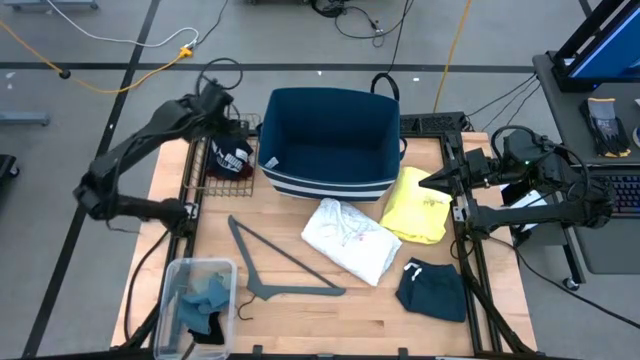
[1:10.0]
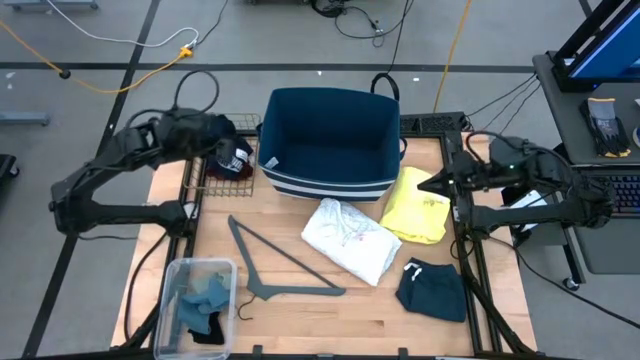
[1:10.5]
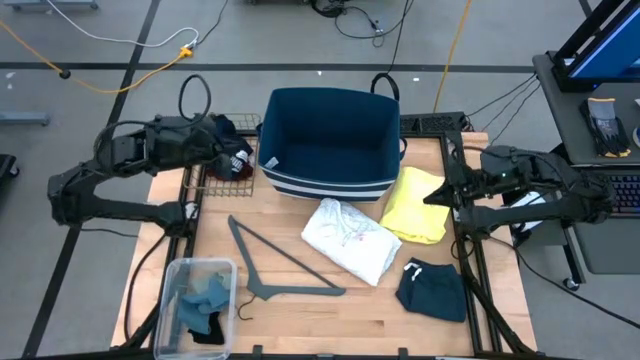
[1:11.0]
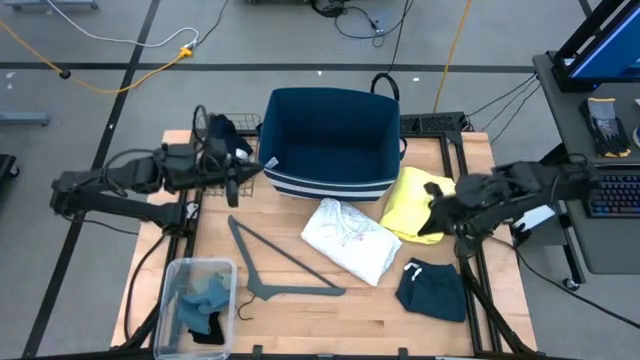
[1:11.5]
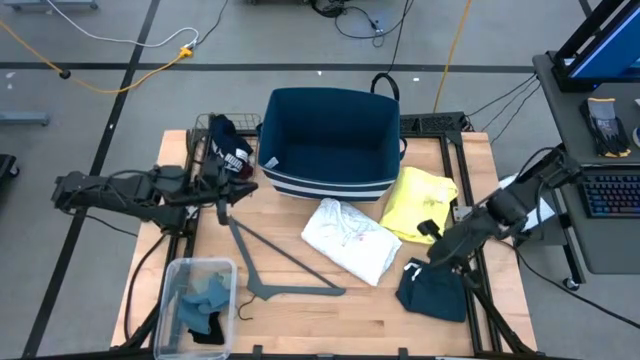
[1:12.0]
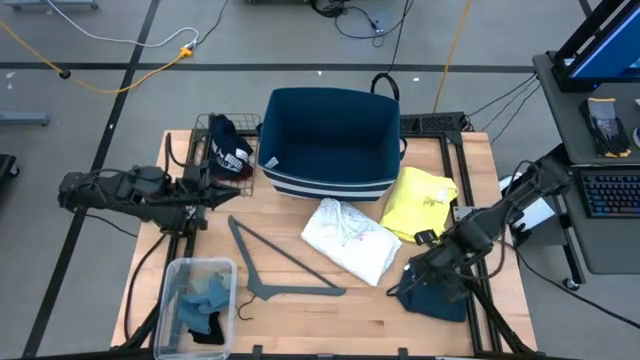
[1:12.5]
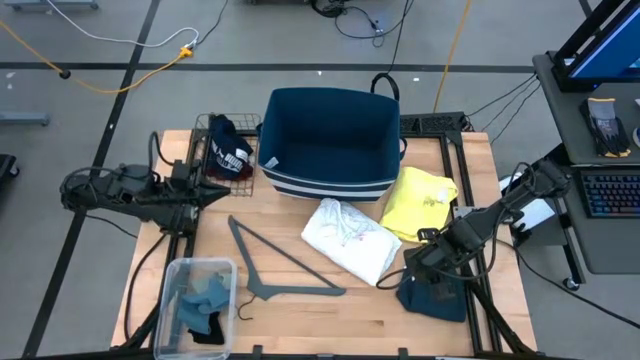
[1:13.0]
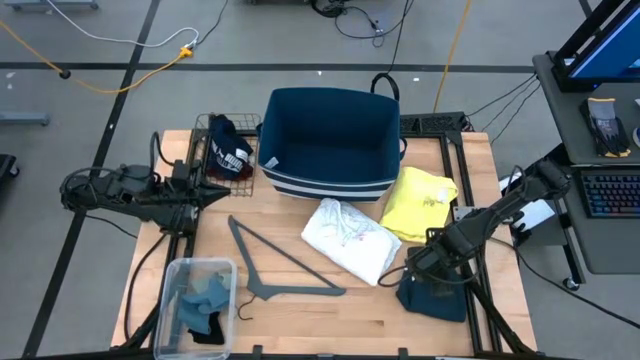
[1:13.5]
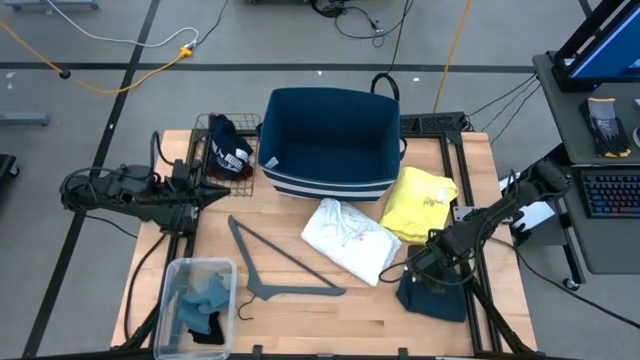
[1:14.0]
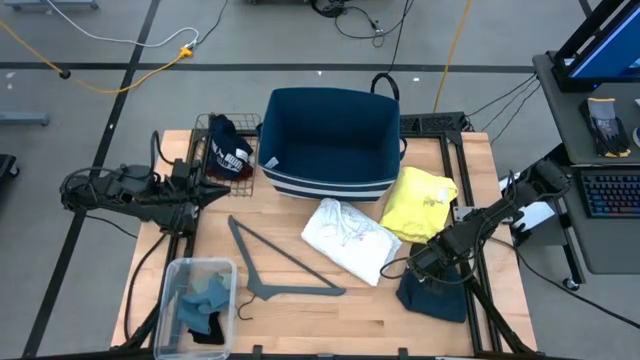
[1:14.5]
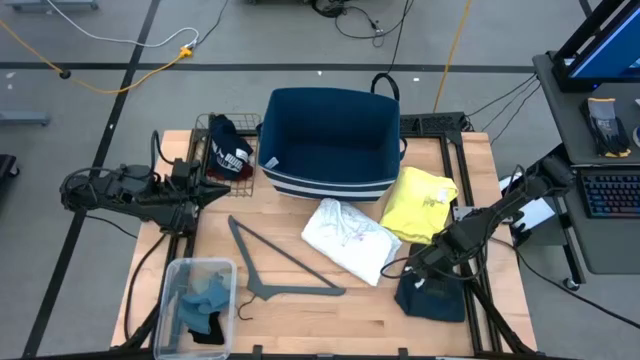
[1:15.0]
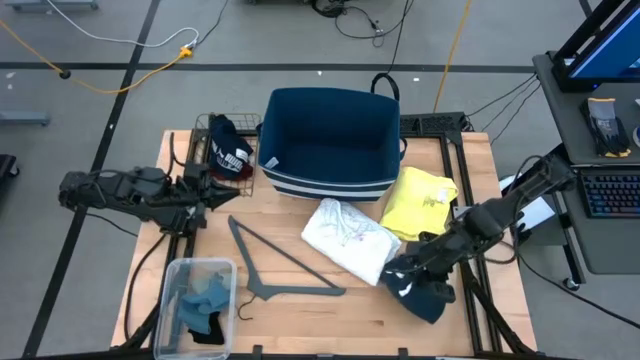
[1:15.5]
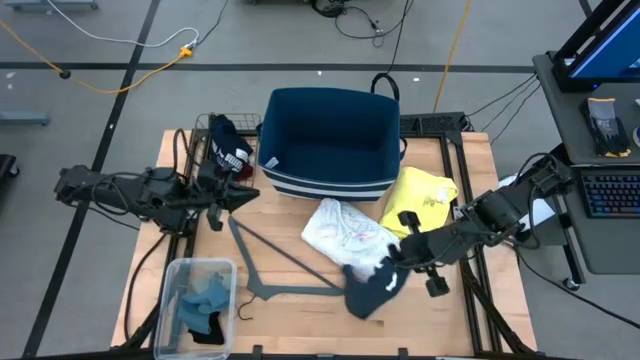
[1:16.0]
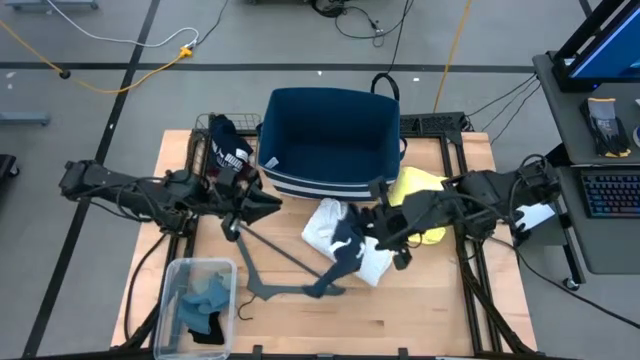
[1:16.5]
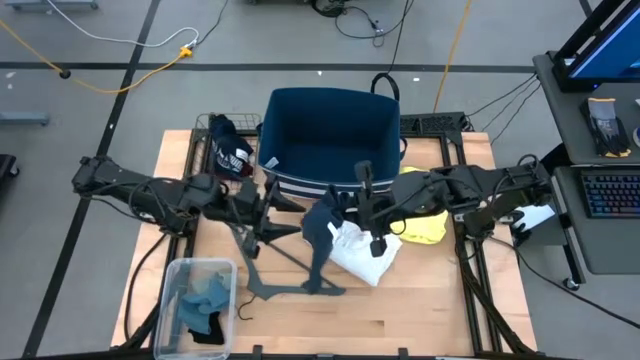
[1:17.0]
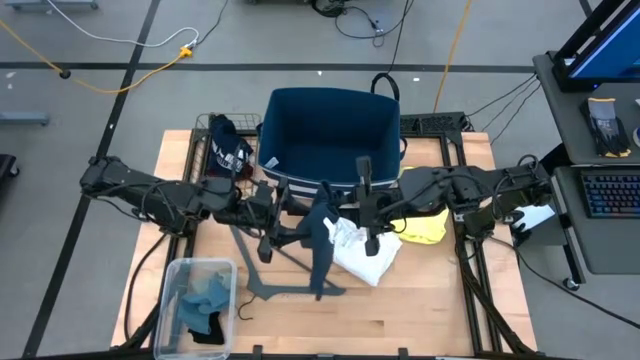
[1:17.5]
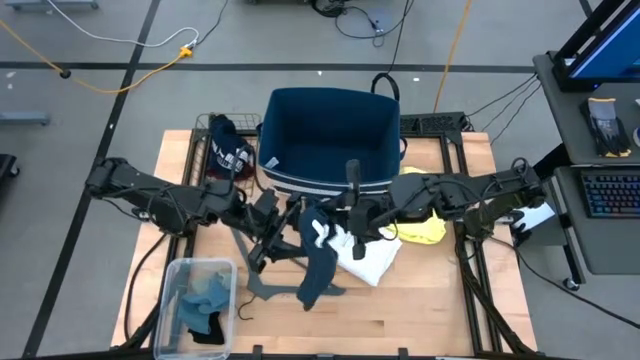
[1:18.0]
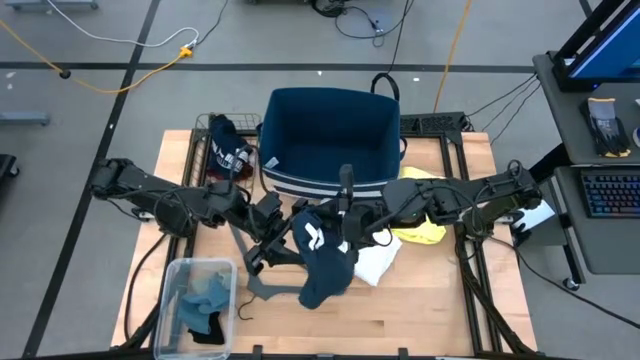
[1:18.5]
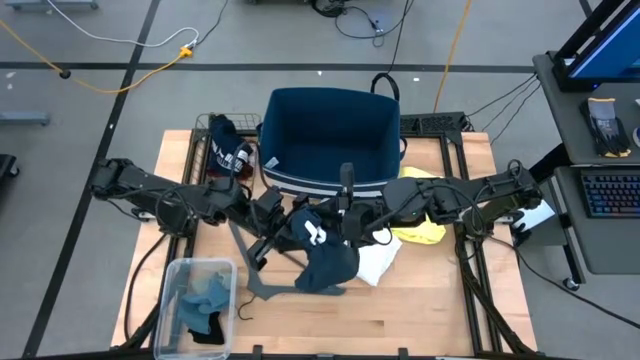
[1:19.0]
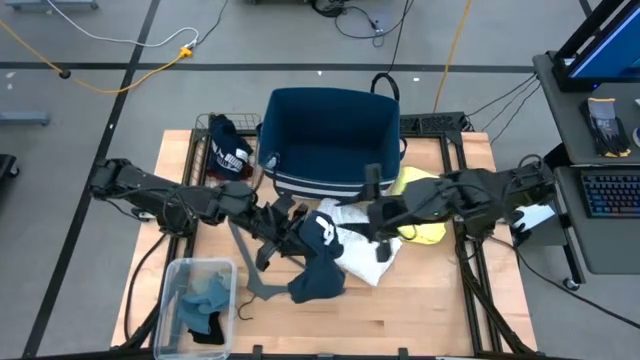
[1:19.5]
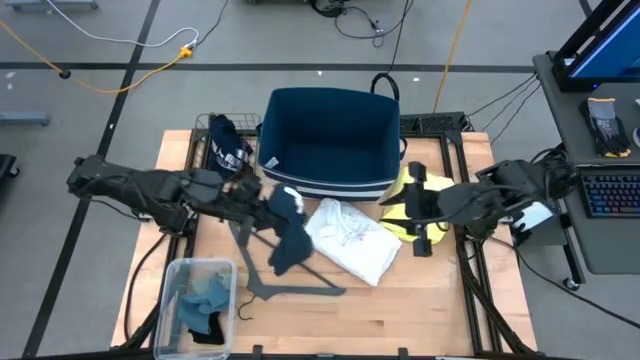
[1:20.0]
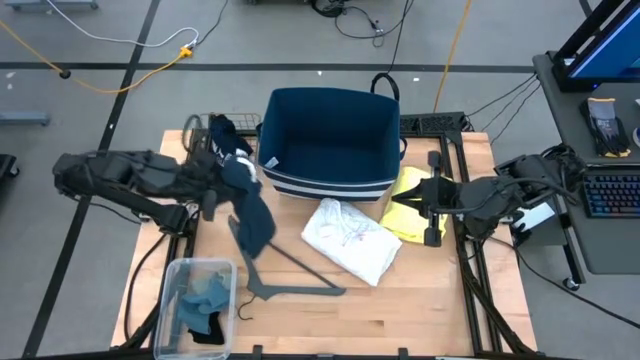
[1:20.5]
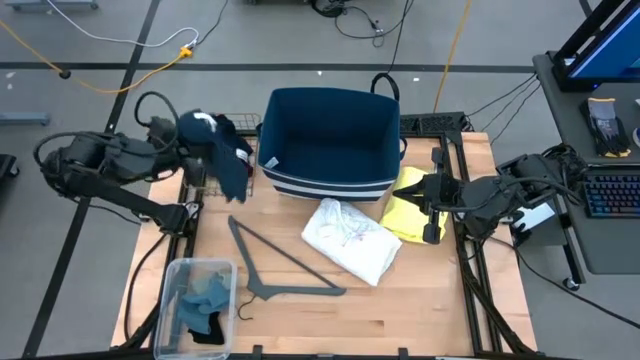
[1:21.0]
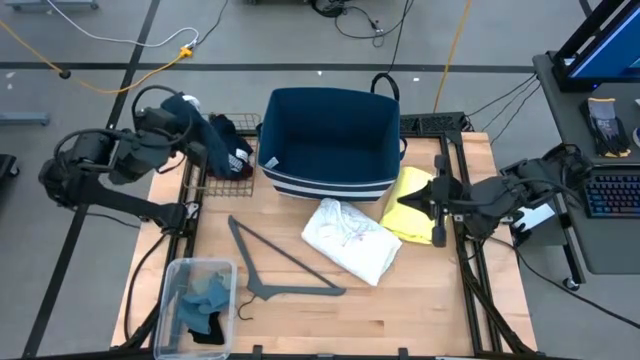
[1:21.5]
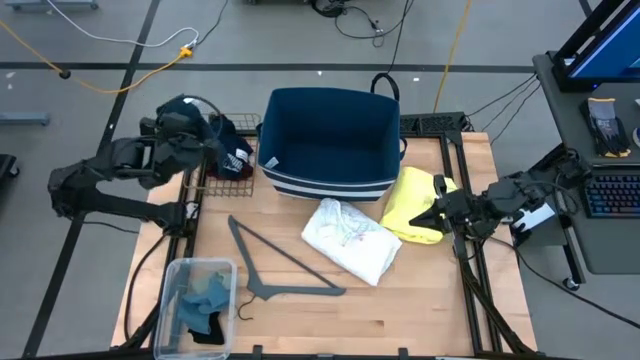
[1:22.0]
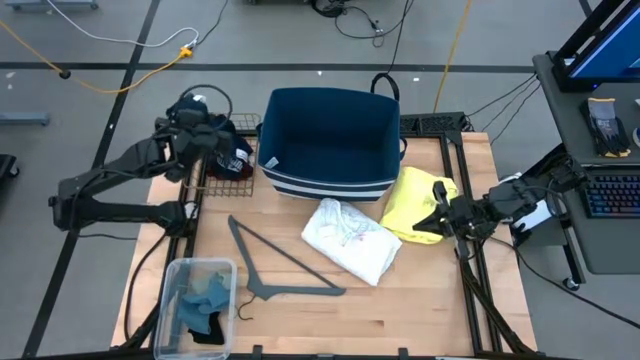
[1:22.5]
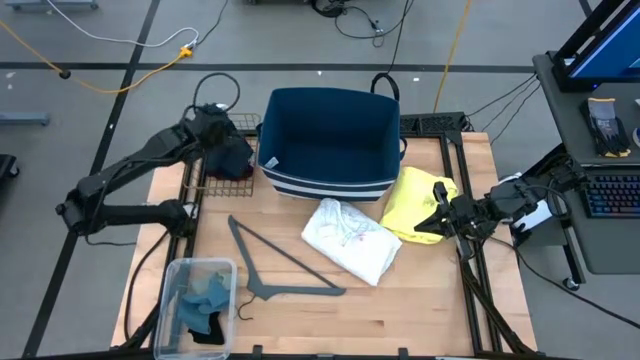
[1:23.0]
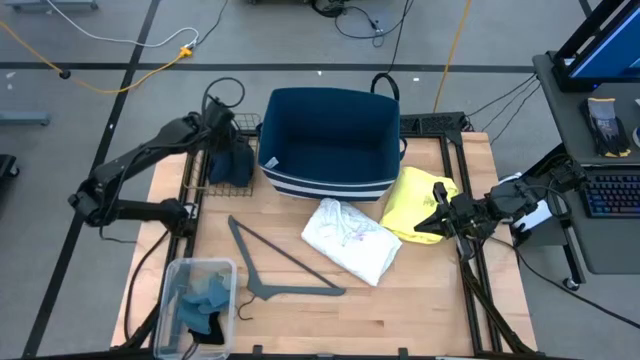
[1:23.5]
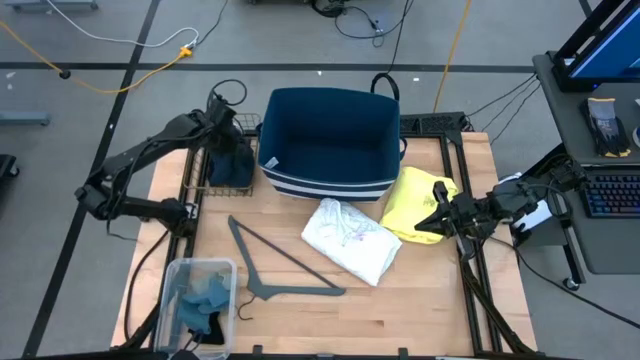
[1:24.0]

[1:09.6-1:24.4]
Task: Pick & Place Cloths
Put the dark blue shorts into the brown wire basket

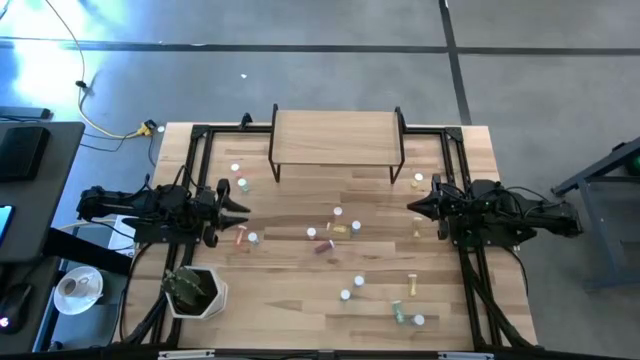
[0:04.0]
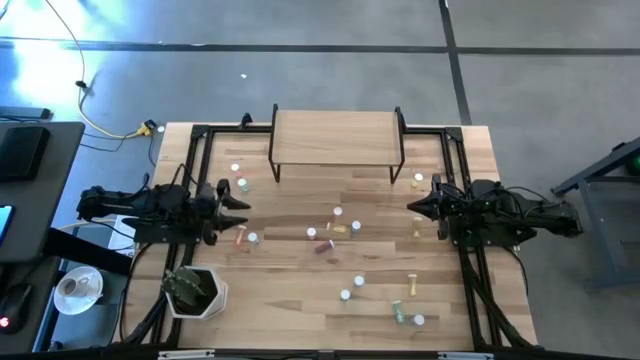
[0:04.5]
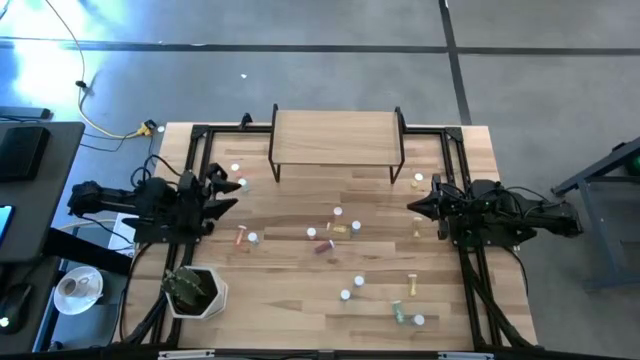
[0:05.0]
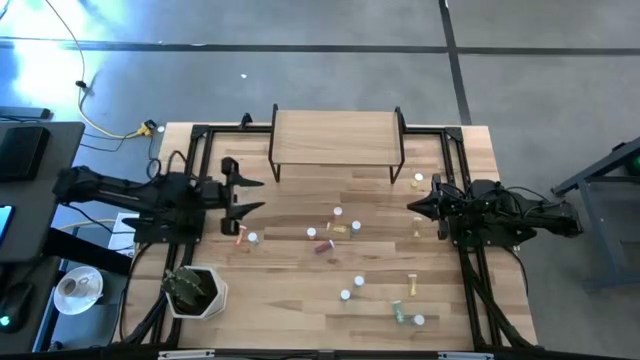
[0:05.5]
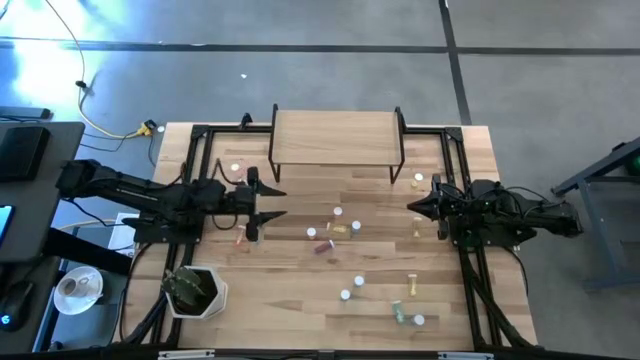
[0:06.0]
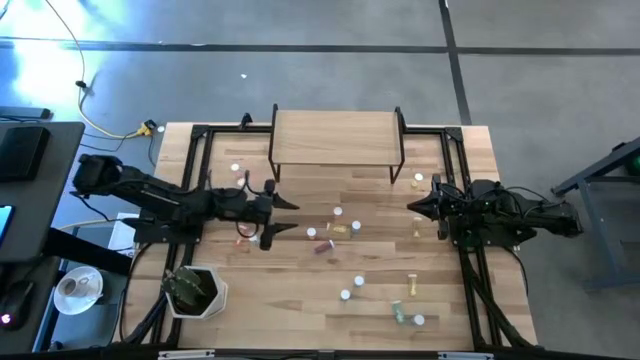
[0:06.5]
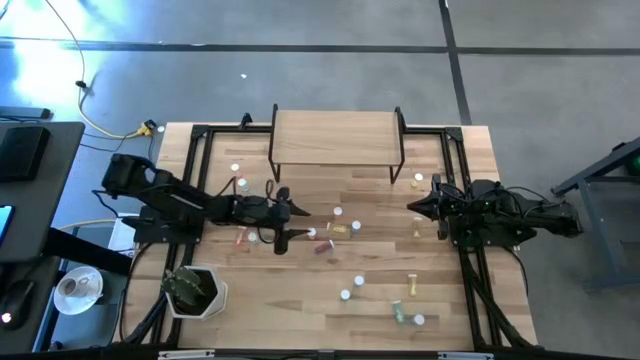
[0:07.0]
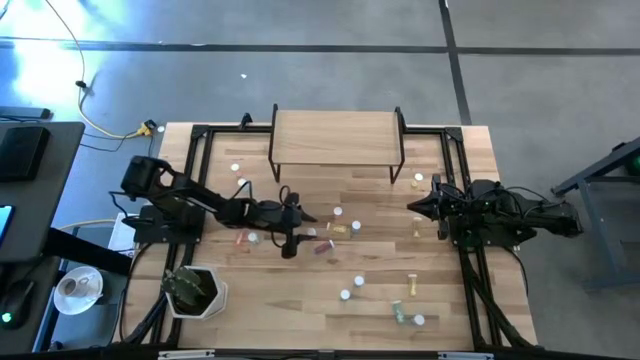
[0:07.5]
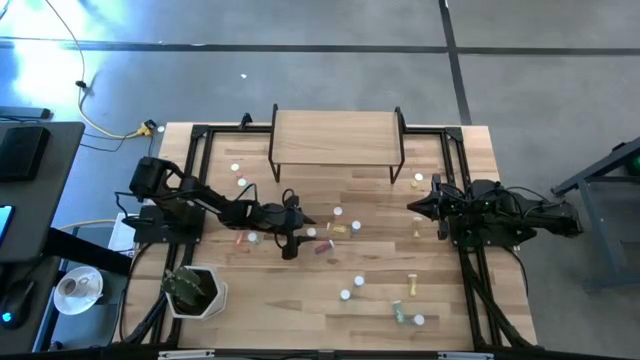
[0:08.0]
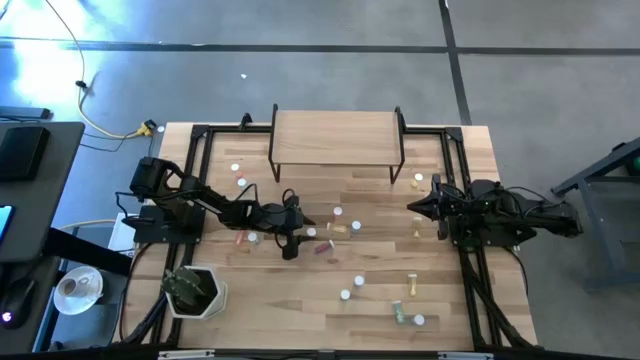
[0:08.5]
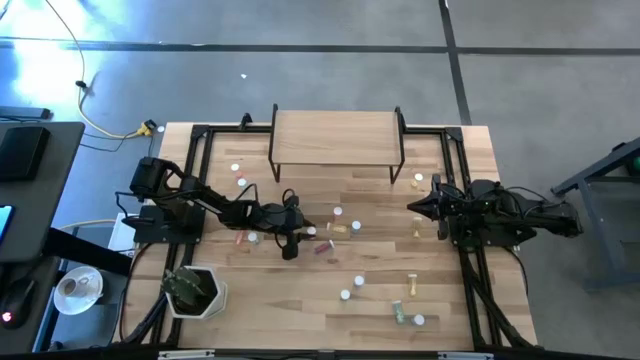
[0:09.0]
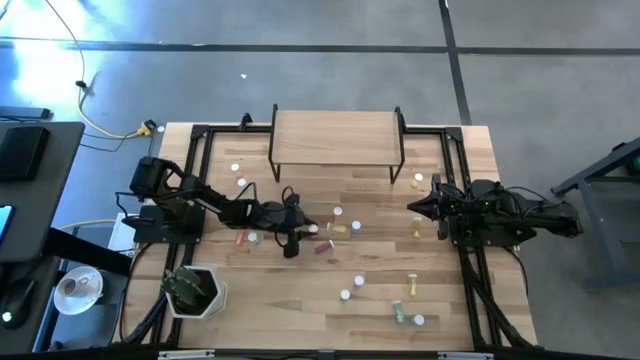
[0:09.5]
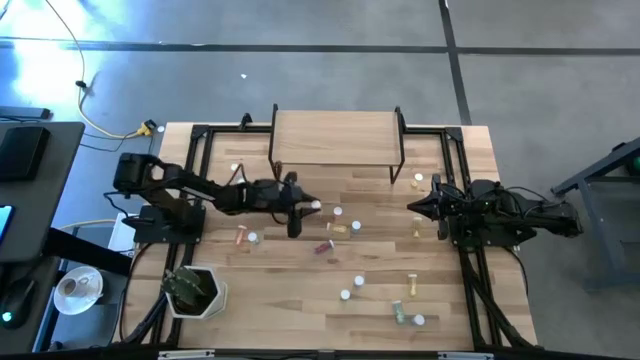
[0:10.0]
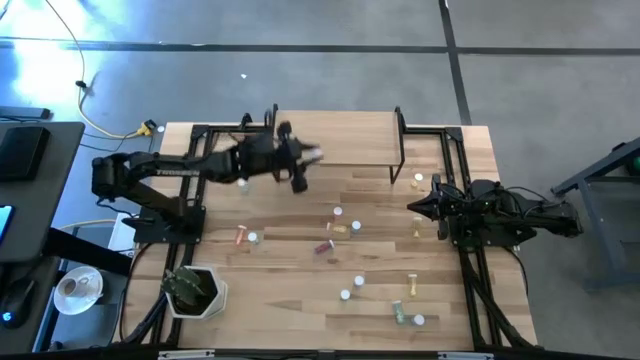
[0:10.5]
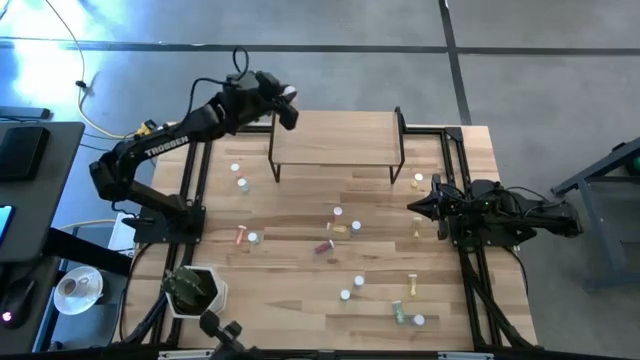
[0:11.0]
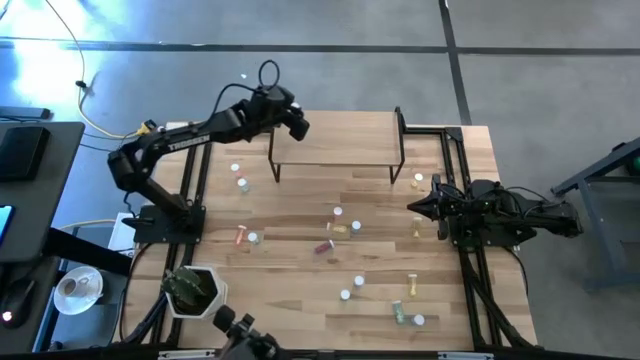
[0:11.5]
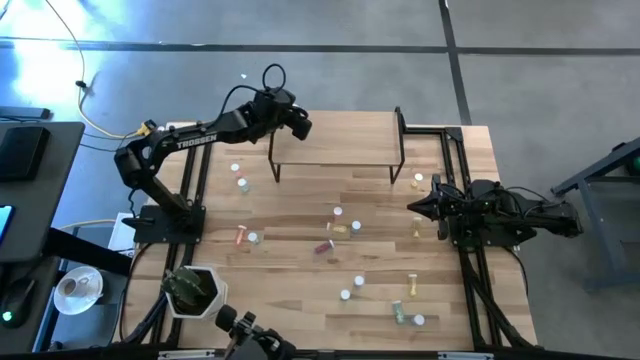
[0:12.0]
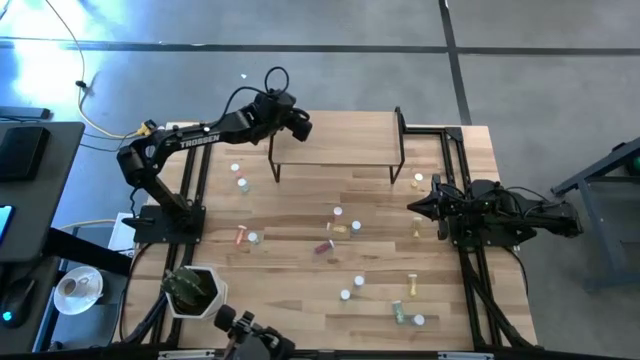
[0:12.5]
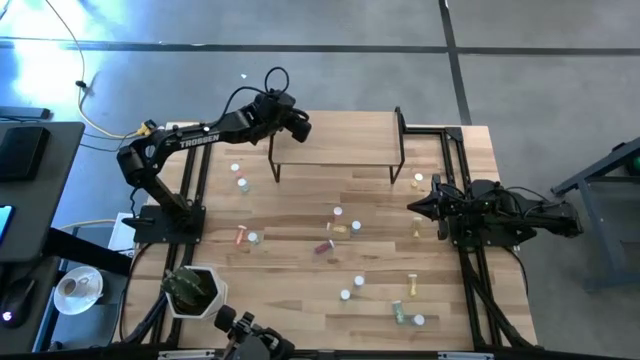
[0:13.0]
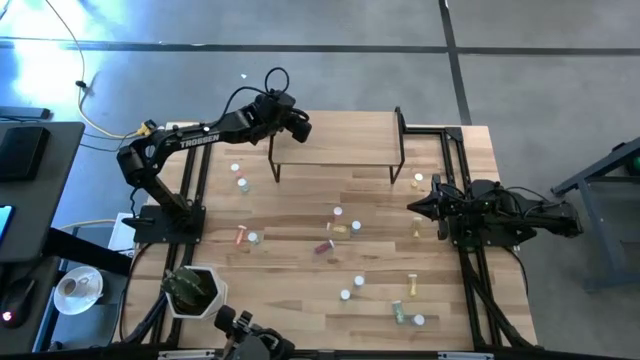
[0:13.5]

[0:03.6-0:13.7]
Task: Pick and place medicine bottles onto shelf by color
Put the red medicine bottle on the shelf
